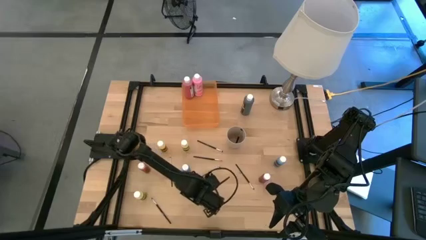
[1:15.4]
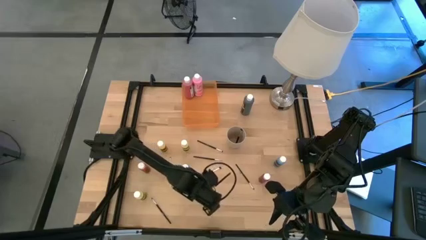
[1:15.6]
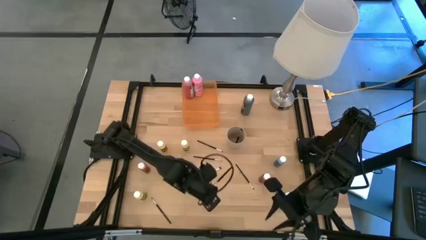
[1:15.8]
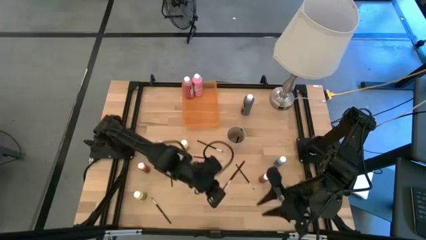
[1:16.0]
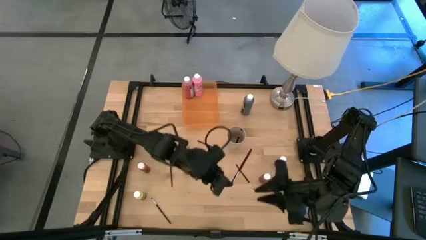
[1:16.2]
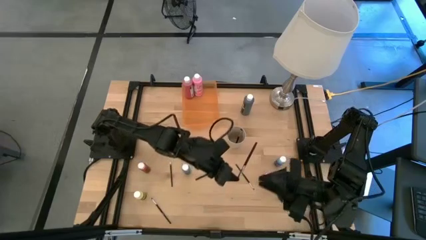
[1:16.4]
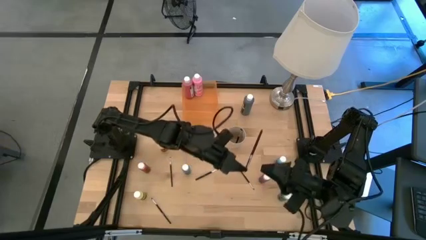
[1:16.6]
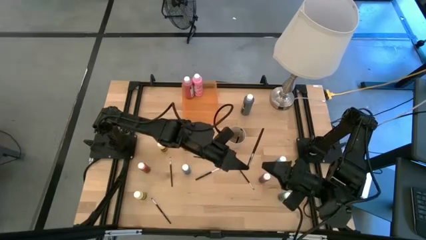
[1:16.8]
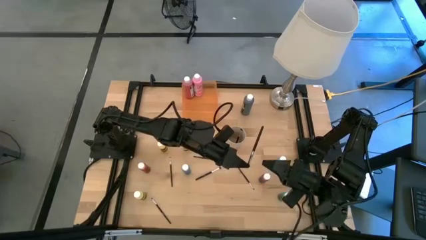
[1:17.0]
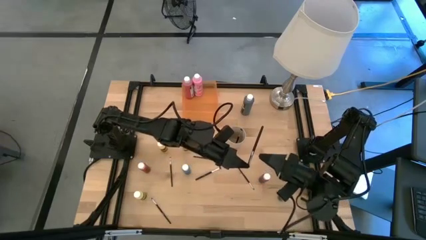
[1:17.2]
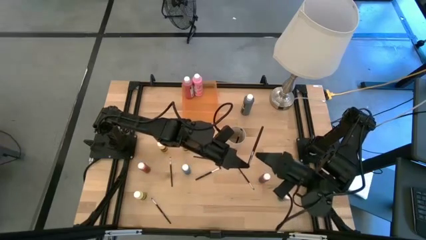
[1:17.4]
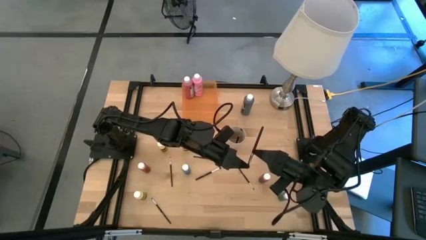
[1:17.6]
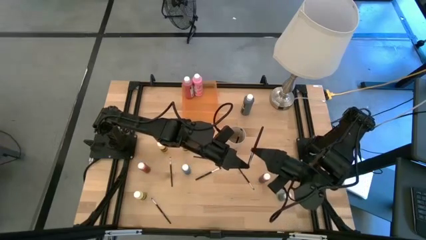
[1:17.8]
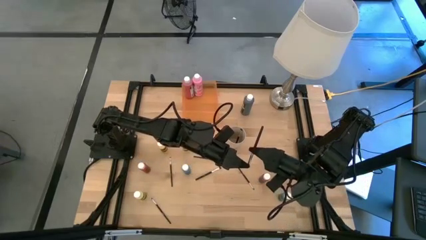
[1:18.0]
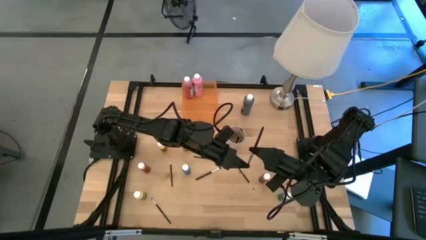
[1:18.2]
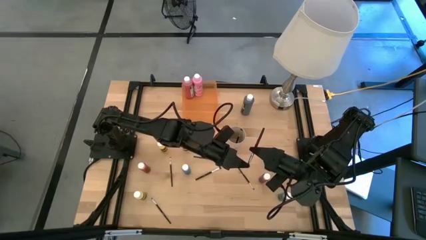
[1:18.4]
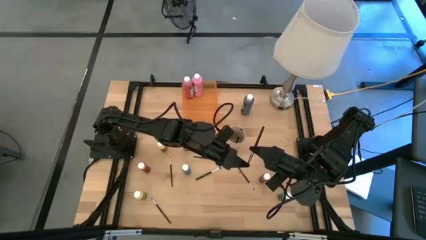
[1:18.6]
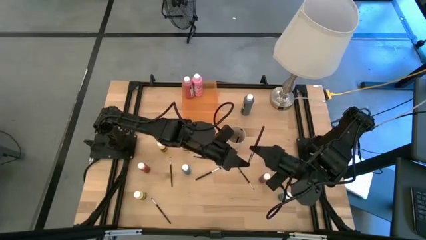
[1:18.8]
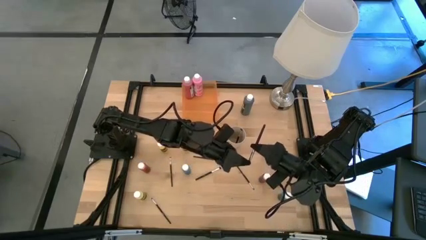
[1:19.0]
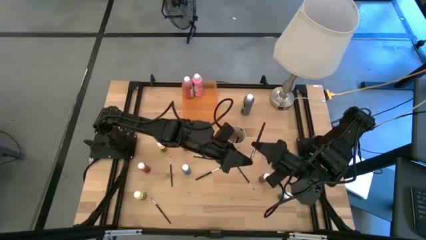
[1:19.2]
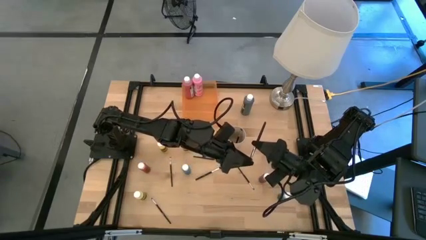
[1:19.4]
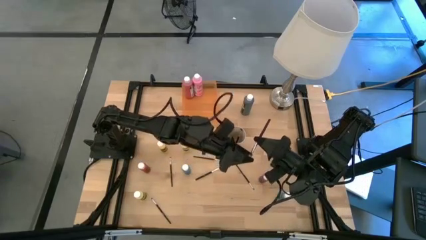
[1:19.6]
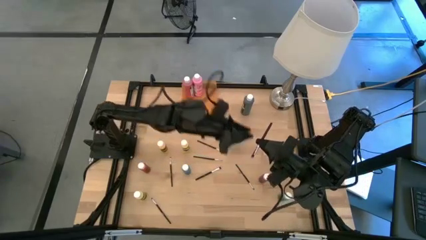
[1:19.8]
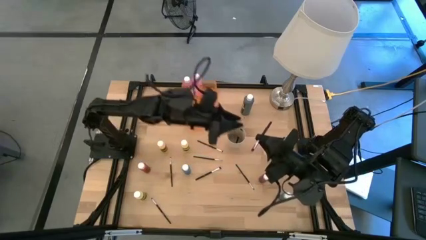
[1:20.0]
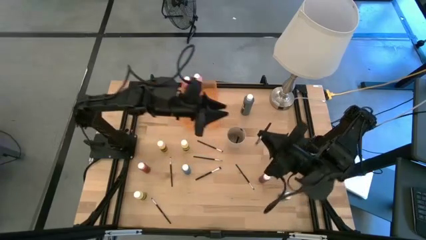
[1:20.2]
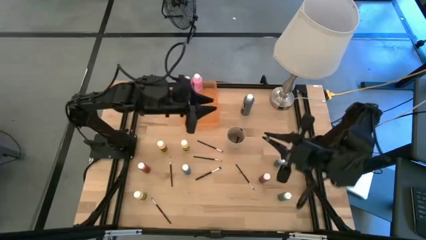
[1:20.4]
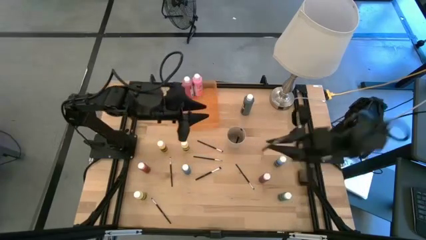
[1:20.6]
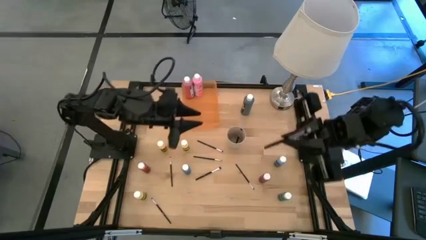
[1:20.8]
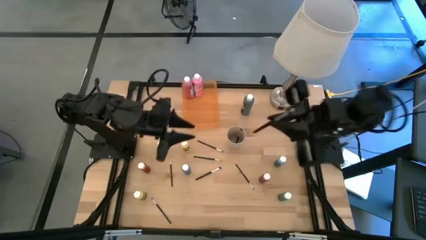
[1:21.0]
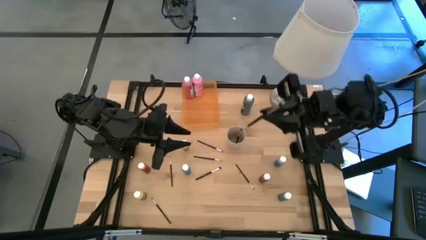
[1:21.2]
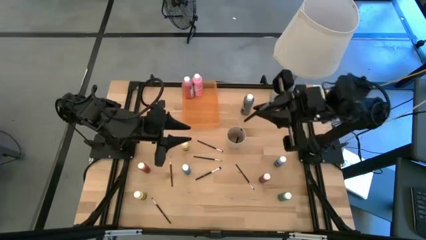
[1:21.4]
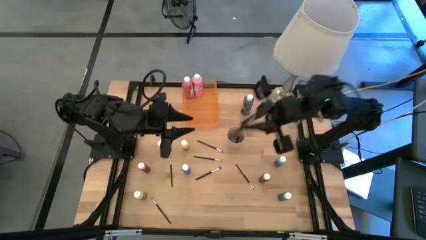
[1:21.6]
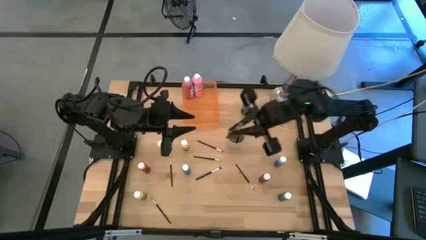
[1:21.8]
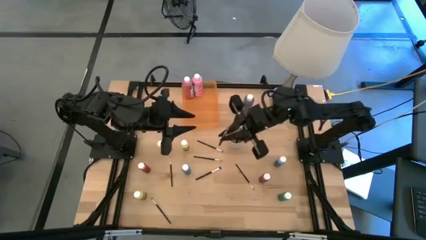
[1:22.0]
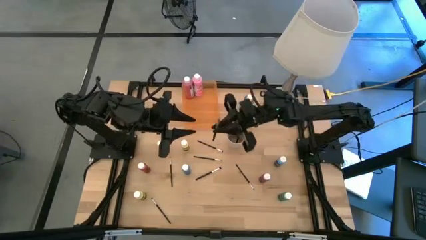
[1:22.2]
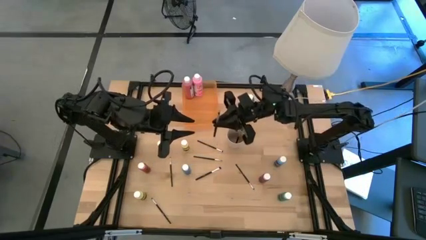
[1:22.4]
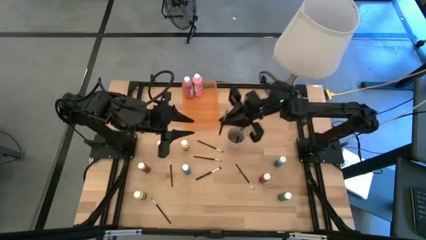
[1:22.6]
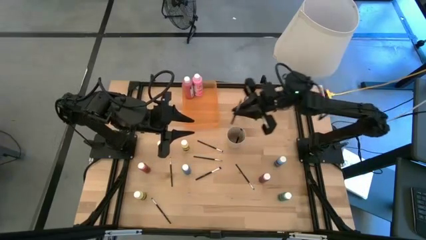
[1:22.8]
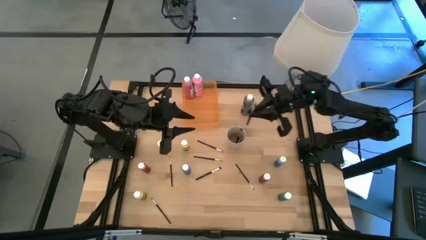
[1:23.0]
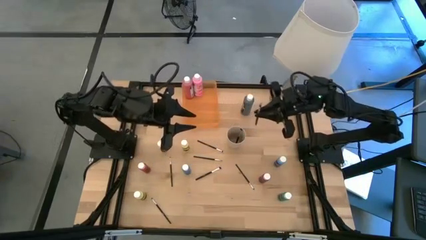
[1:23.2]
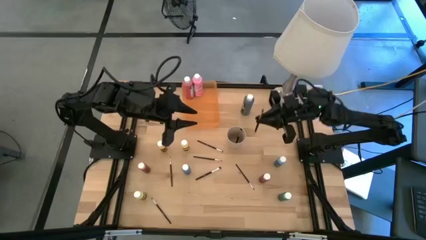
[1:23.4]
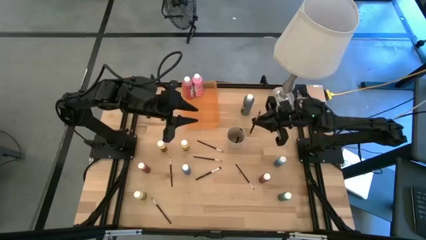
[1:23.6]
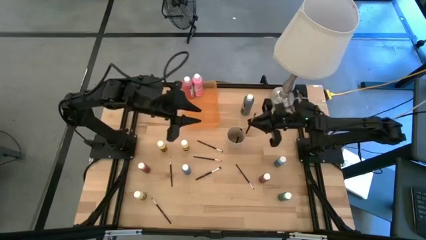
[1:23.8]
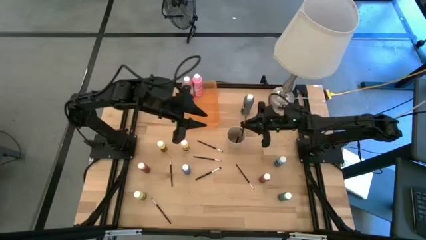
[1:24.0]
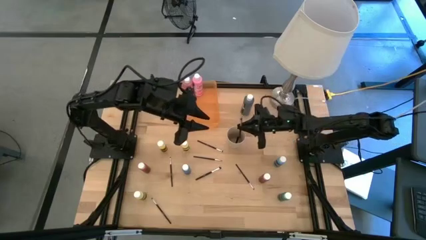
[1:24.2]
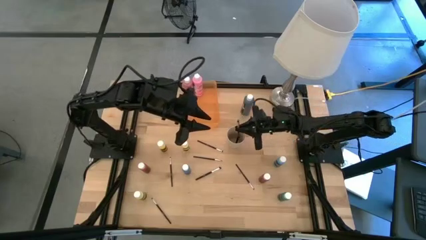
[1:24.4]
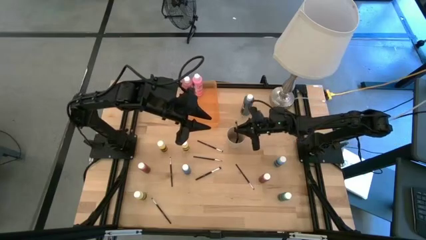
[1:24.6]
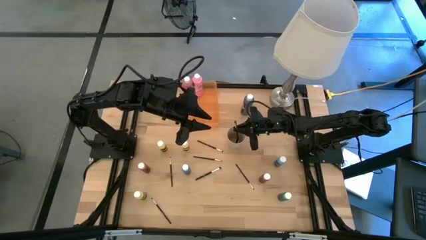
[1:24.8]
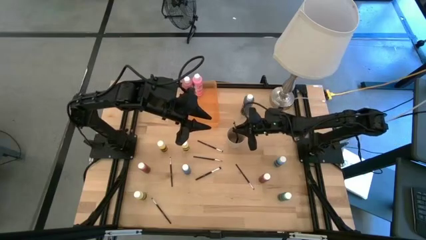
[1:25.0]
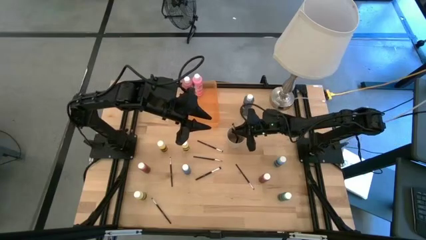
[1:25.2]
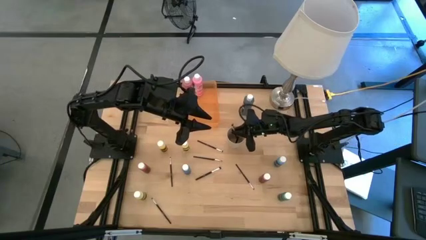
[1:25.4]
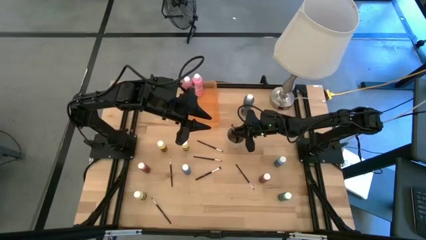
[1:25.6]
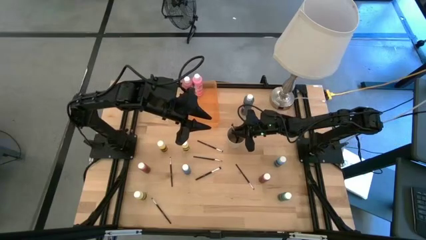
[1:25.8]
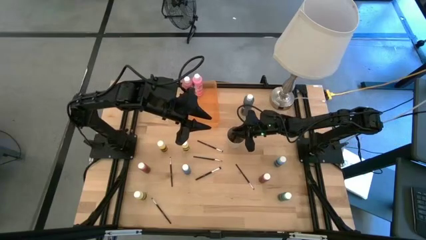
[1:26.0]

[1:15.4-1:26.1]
Task: Pick & Place Paint Supplies
Put the black paint brush into the light brown cup

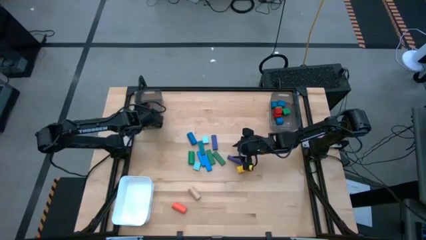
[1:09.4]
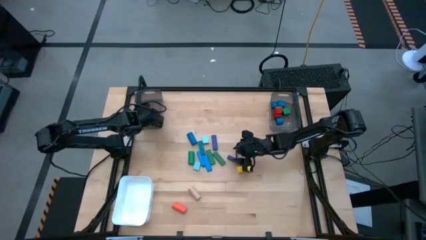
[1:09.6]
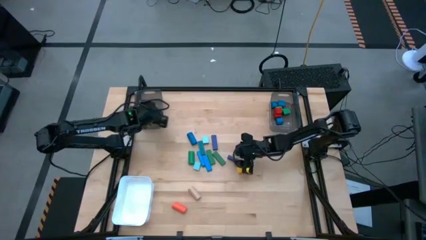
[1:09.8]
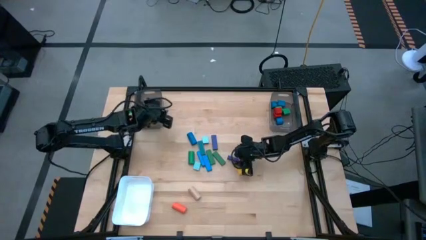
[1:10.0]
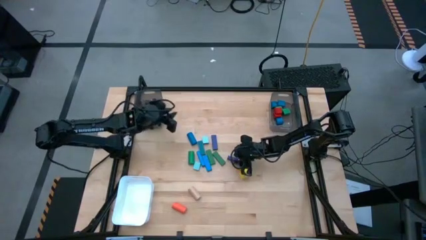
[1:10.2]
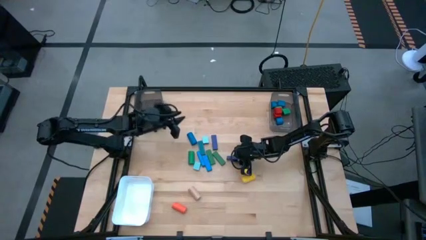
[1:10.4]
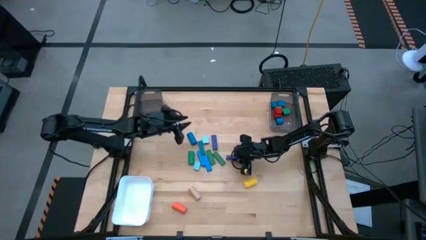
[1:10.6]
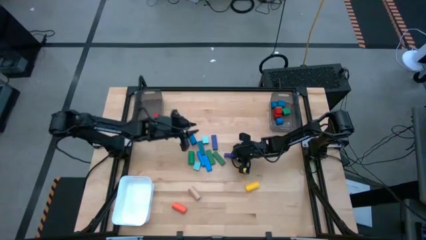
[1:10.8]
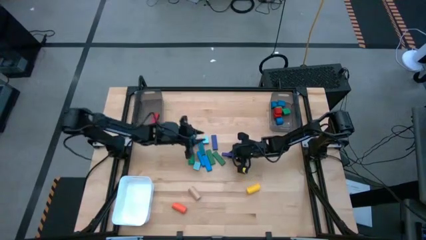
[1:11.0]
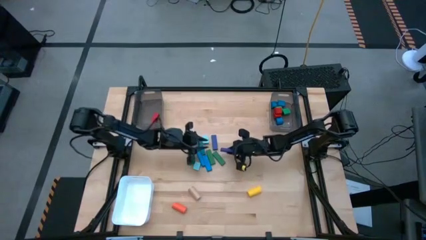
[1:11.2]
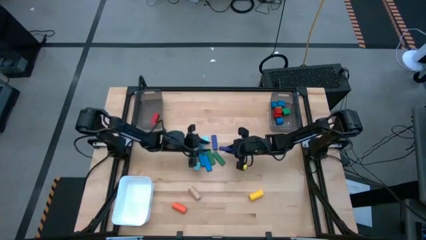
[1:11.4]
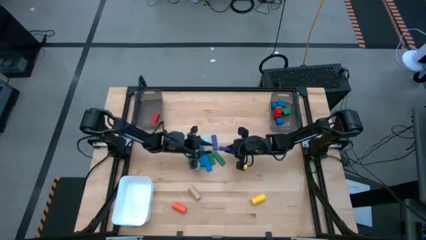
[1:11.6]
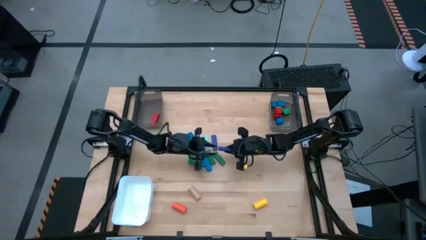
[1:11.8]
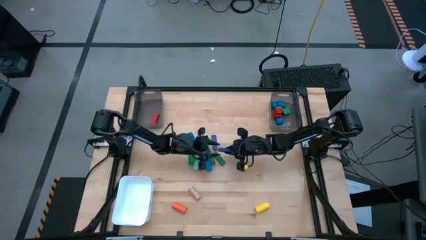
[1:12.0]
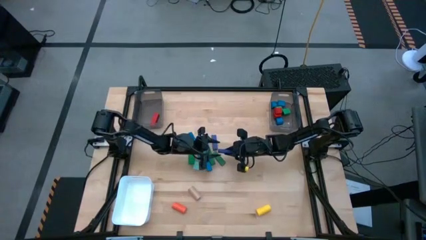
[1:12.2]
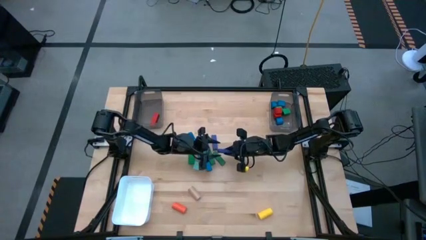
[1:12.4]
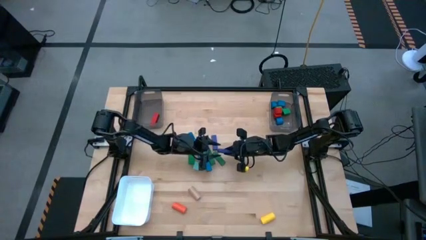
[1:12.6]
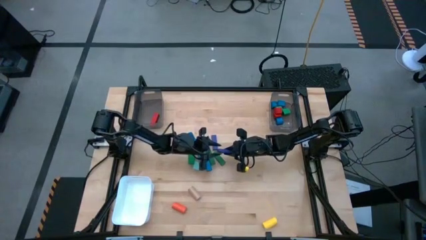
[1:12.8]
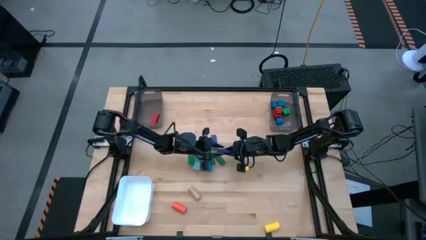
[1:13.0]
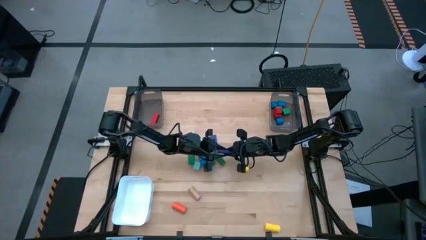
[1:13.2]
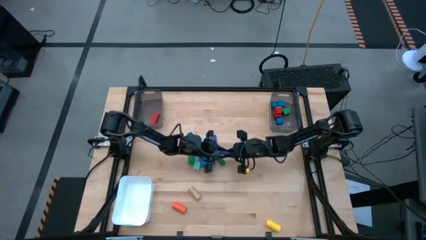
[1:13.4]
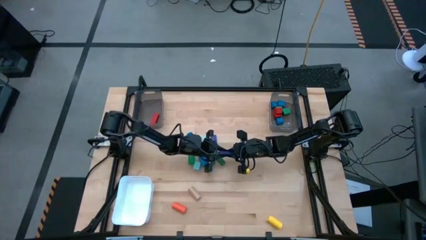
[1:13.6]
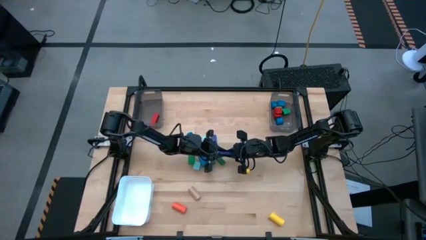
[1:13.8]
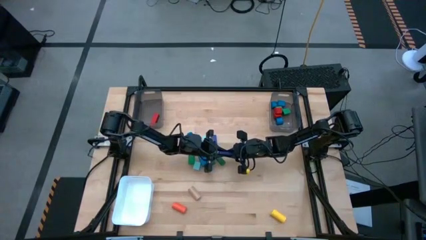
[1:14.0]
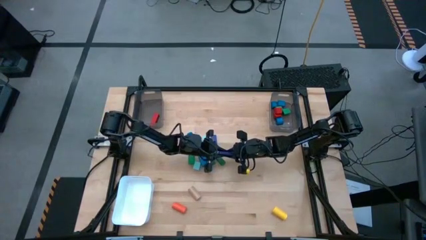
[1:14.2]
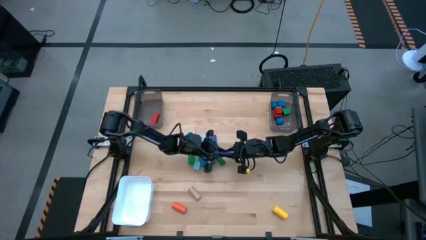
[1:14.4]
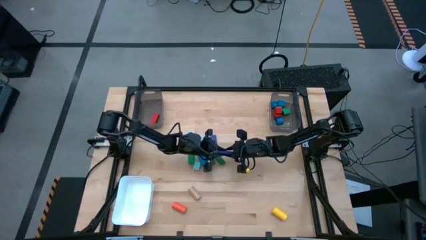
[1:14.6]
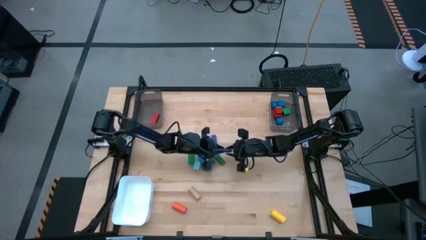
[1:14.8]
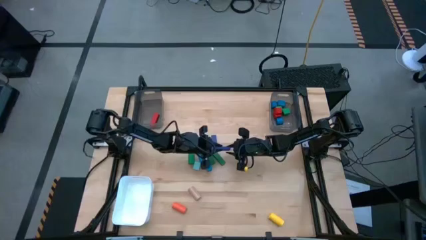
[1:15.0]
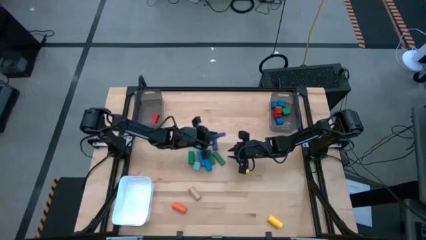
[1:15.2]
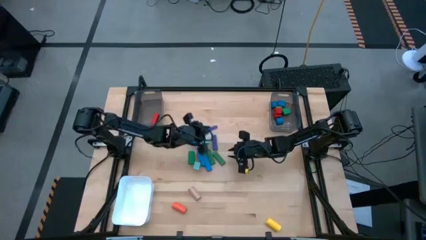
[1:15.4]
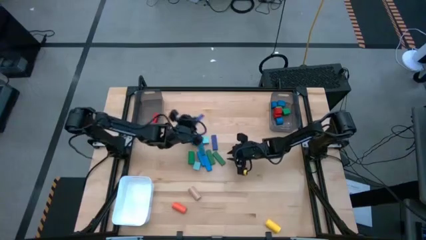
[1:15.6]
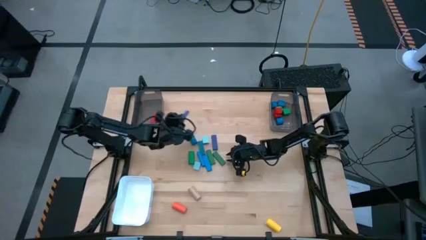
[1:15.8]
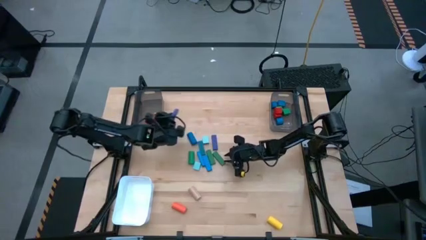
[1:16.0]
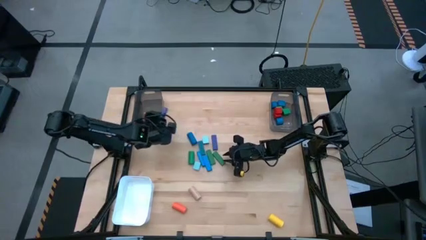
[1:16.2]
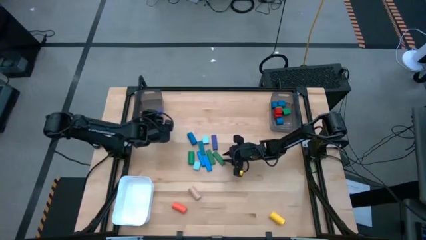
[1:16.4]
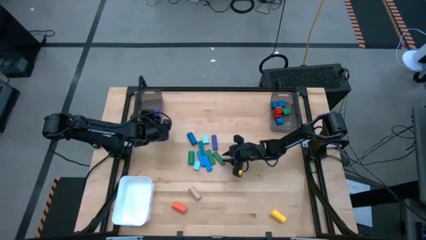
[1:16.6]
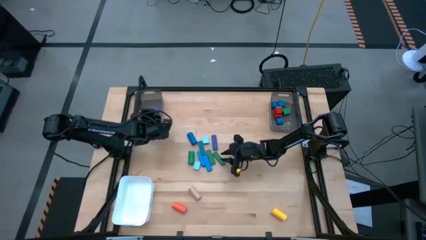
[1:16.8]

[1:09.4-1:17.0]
Task: Sort blocks by size
Put the blue rectangular block into the left black bin
